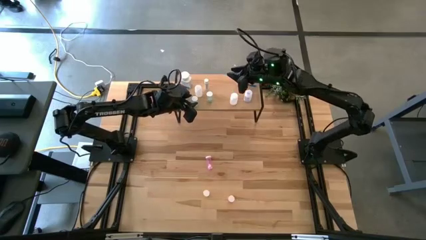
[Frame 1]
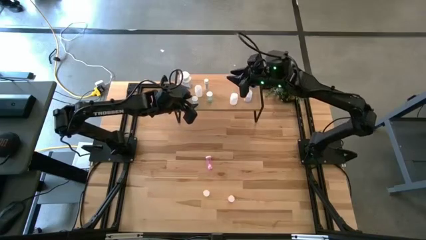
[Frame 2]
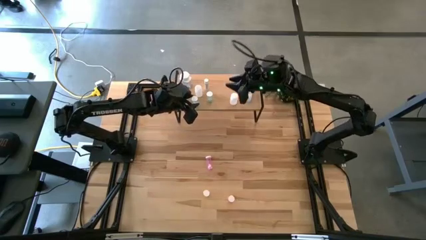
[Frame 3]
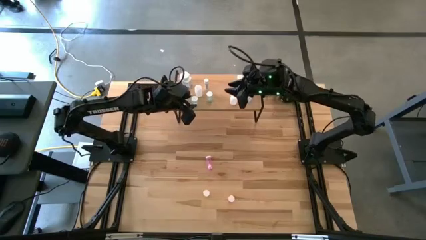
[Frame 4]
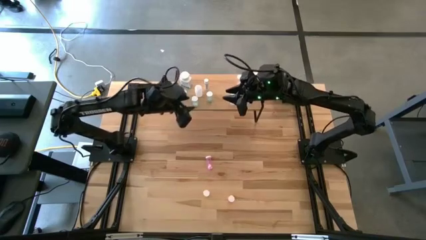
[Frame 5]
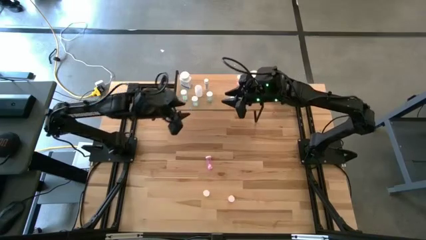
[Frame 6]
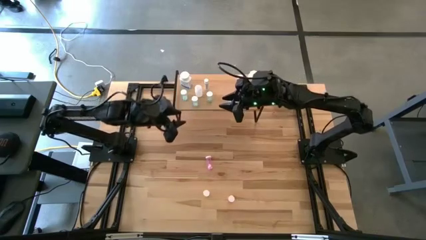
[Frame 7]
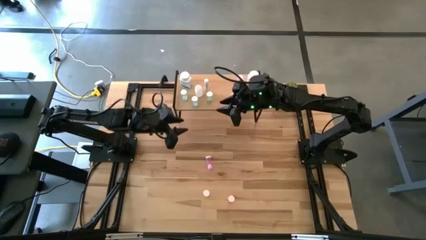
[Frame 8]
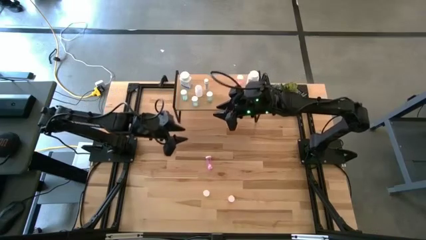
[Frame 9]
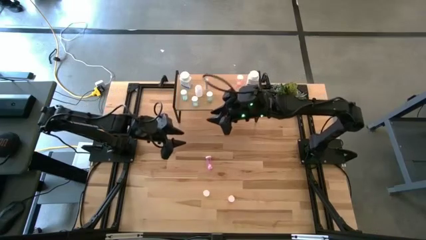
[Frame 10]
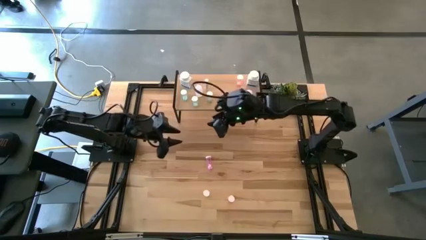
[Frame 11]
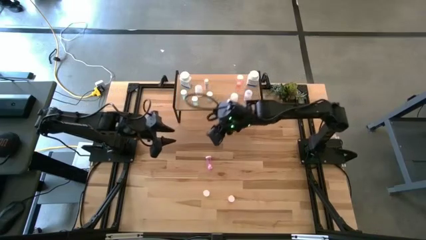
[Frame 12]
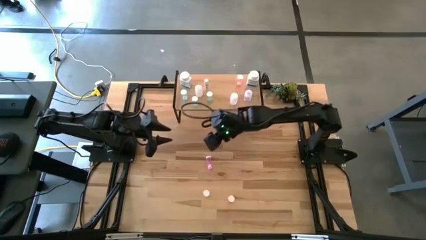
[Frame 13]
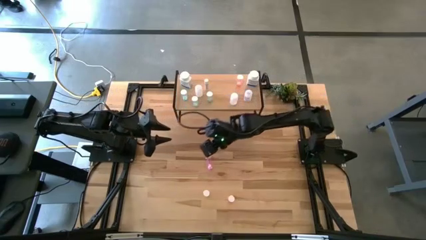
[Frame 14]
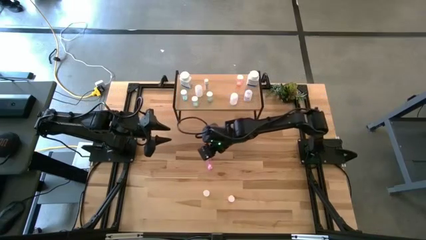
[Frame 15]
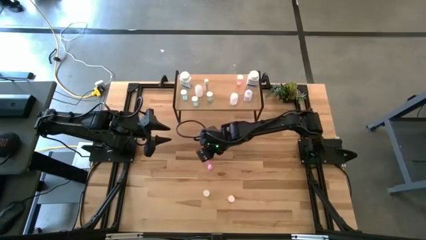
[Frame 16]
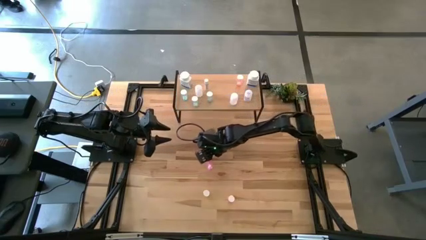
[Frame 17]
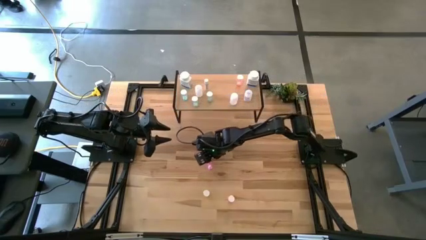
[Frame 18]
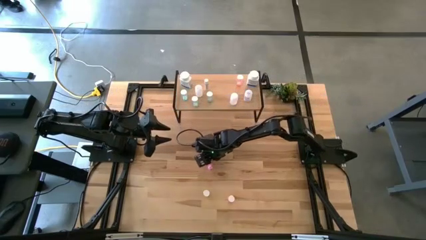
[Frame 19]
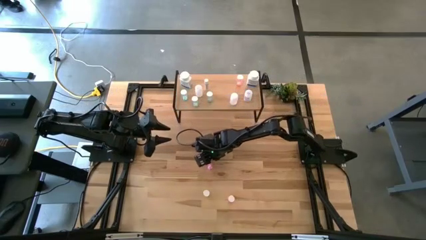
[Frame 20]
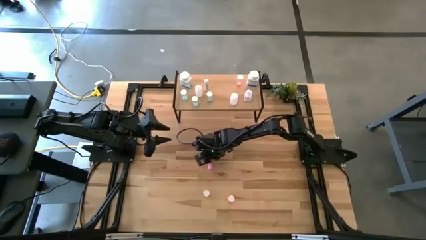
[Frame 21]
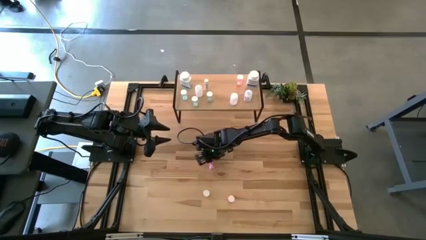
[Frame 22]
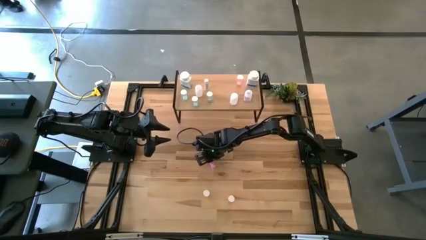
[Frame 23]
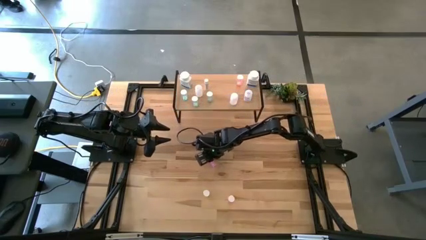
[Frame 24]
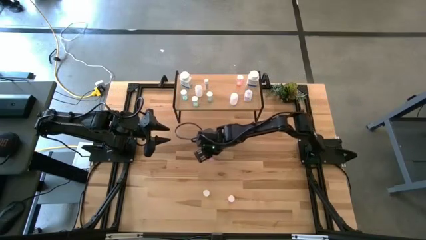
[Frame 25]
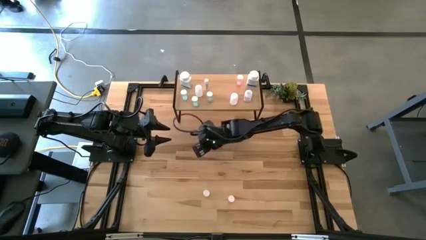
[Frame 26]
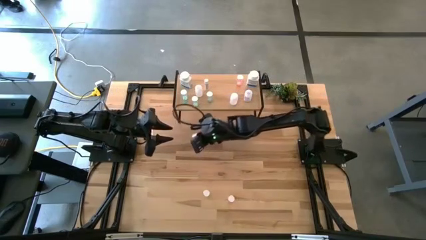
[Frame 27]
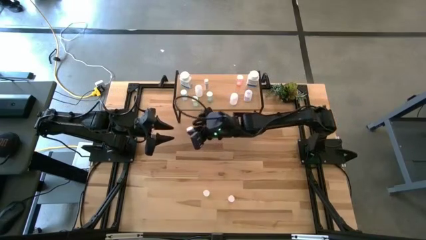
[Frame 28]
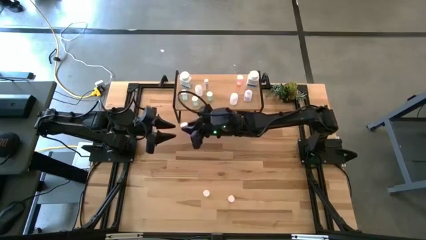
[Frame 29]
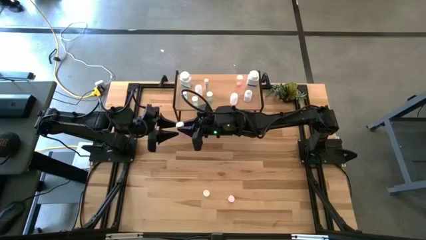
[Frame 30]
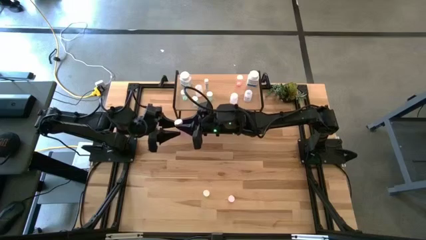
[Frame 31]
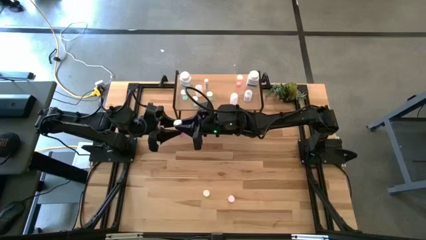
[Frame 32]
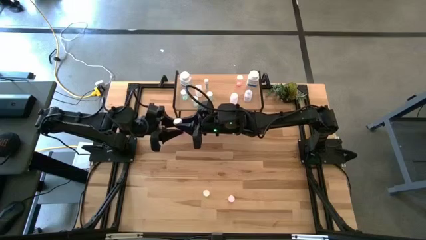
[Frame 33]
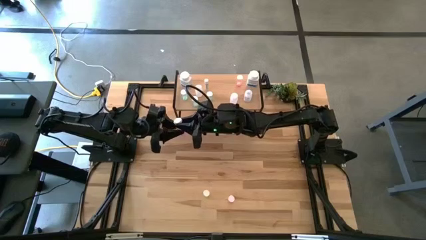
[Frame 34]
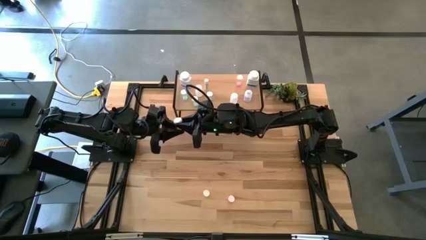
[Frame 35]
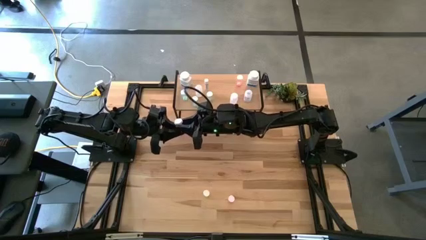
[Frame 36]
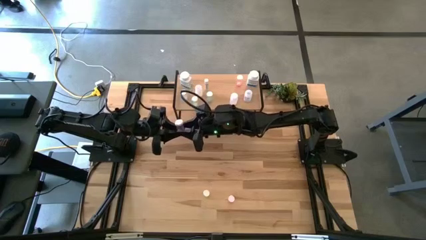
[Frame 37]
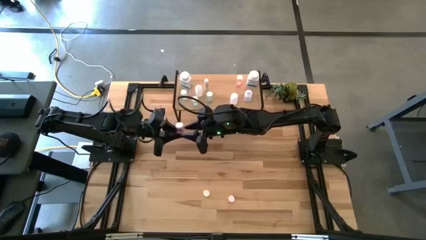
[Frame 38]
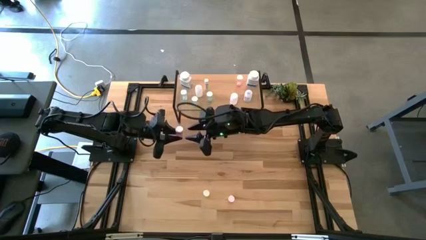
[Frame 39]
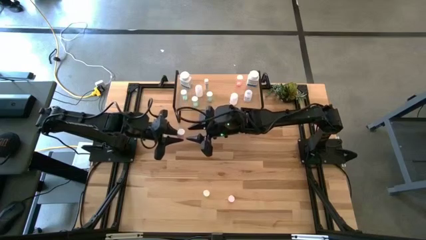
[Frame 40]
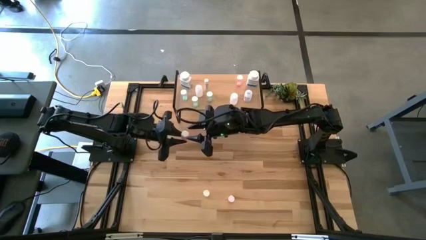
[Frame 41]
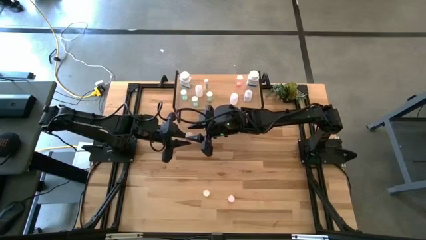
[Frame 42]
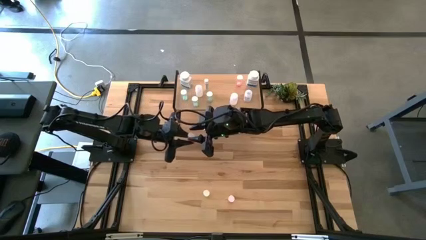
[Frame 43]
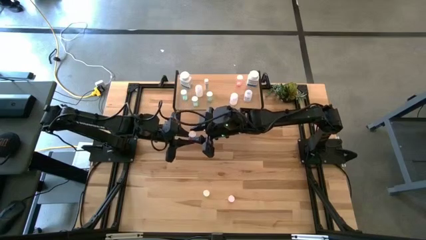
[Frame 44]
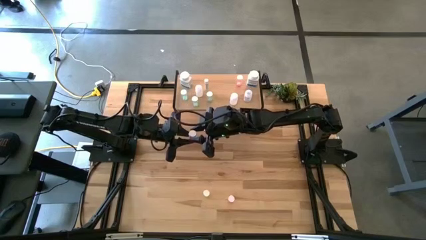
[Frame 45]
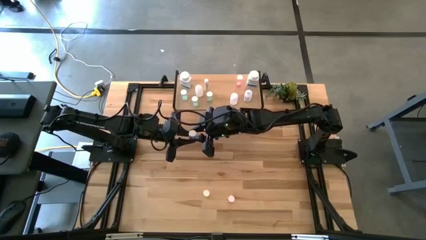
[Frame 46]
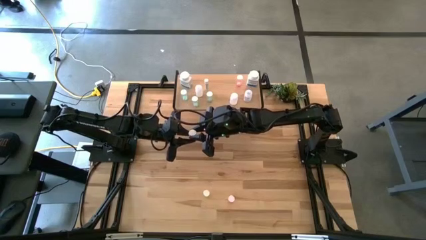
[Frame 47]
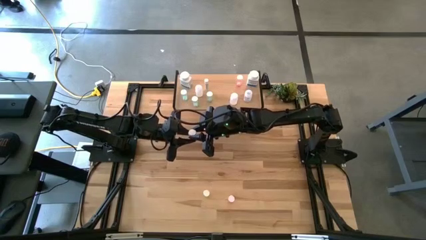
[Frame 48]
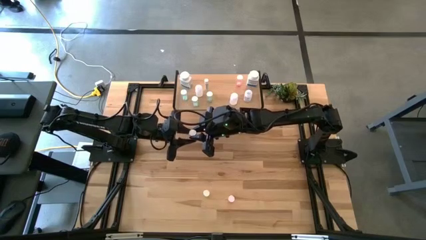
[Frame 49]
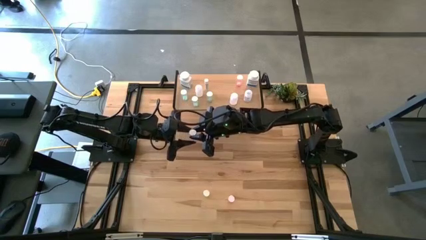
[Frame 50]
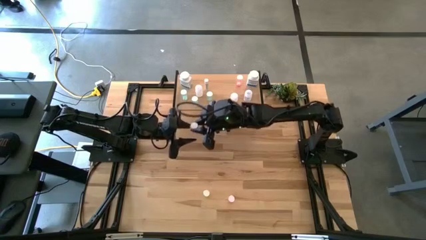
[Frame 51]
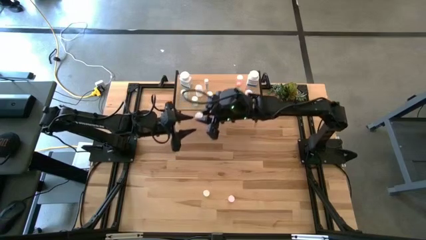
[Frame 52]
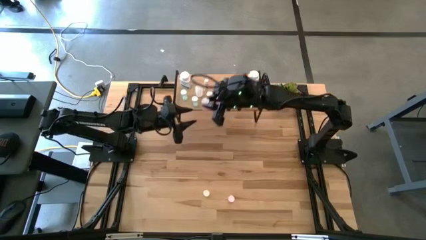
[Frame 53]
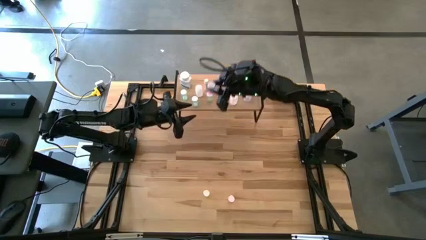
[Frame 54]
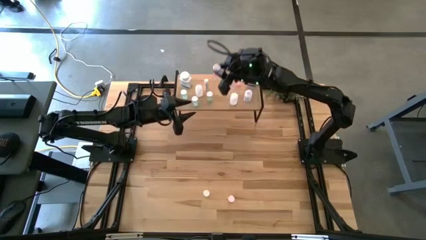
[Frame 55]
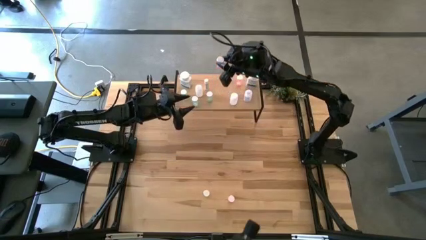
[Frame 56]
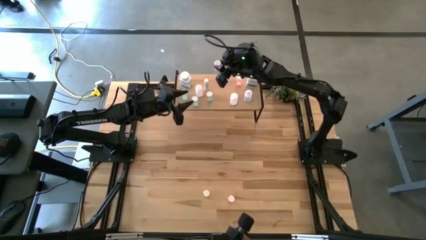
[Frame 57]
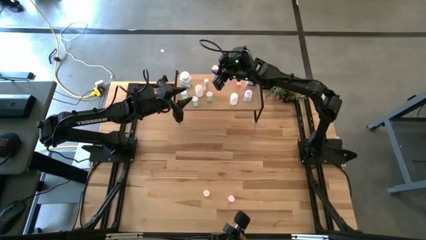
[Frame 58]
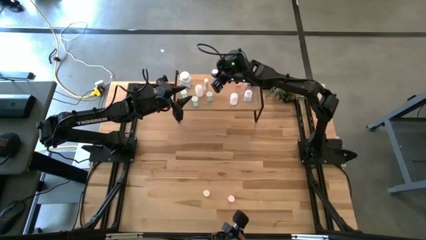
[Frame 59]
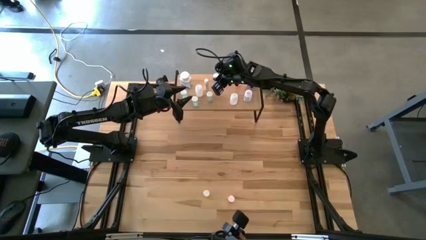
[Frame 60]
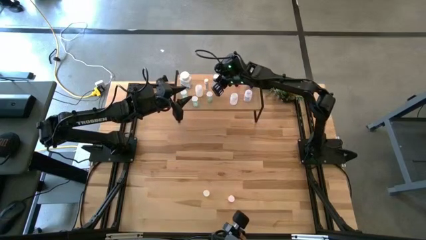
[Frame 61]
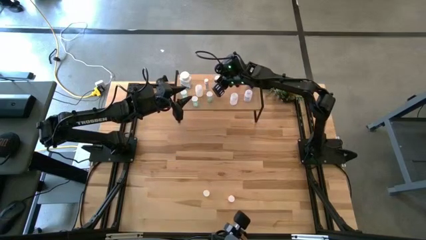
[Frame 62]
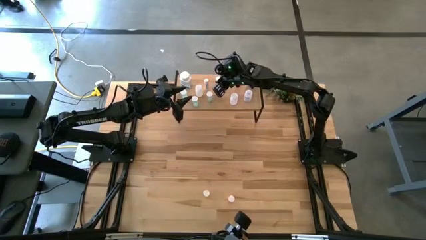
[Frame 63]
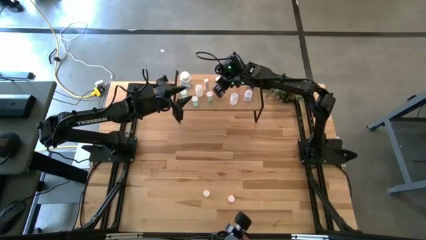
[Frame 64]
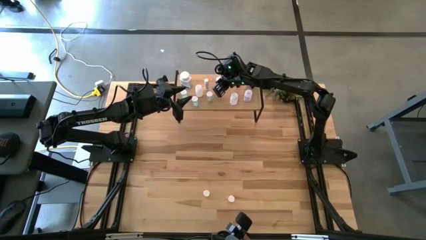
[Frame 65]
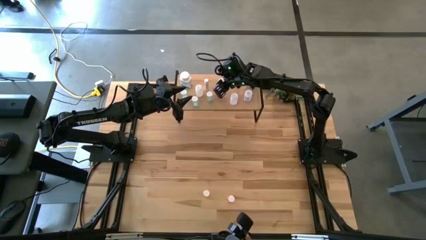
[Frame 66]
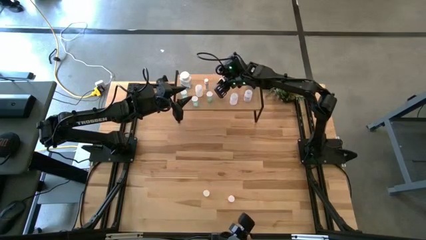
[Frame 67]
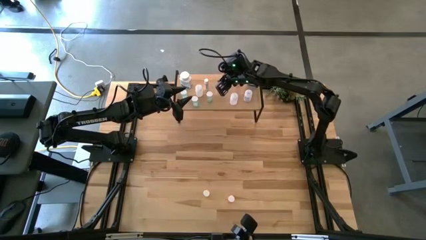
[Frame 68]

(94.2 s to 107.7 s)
Task: Pick and place medicine bottles onto shelf by color
Put the purple medicine bottle on the shelf
